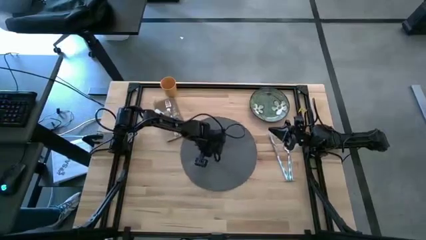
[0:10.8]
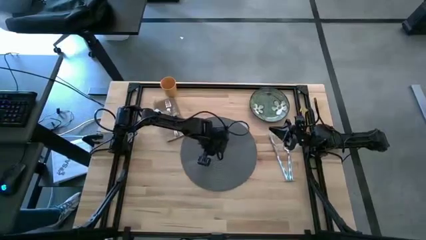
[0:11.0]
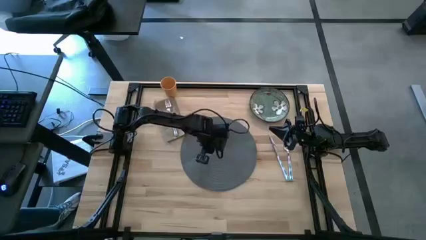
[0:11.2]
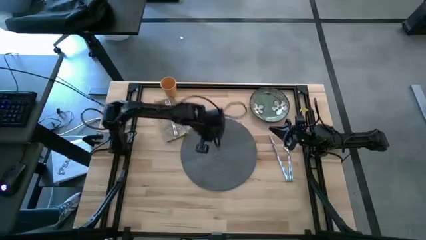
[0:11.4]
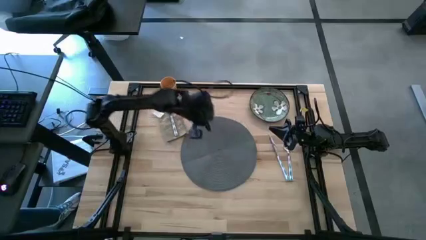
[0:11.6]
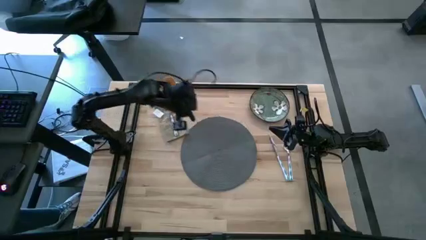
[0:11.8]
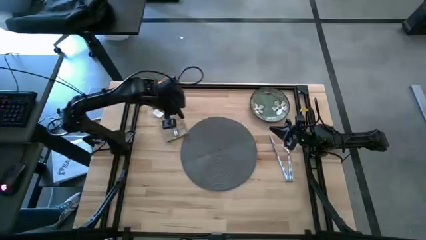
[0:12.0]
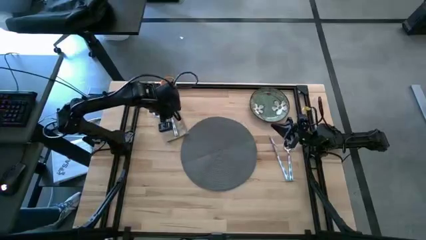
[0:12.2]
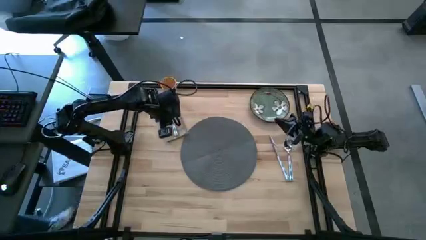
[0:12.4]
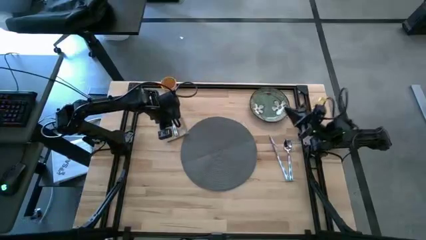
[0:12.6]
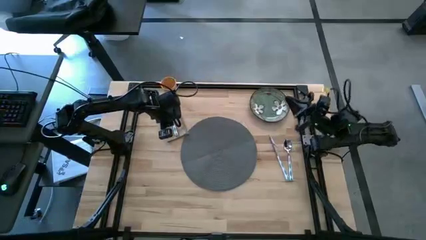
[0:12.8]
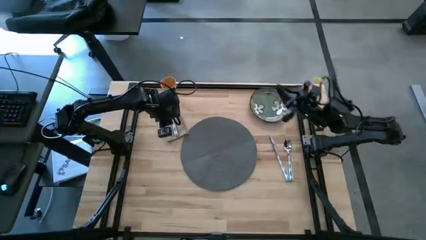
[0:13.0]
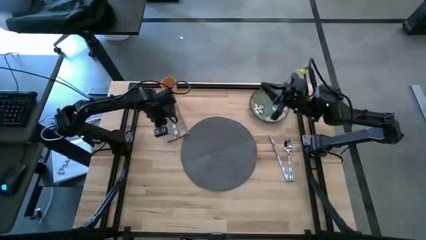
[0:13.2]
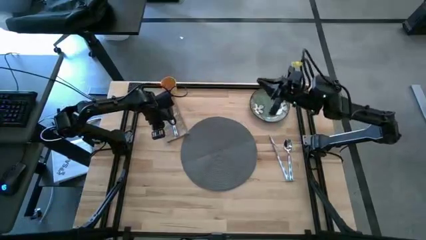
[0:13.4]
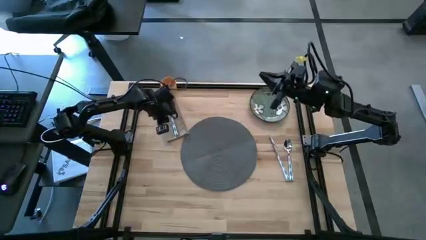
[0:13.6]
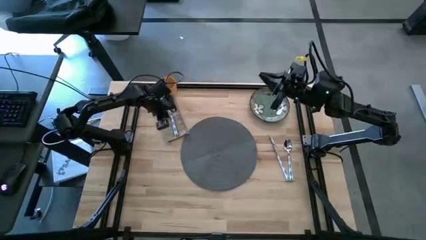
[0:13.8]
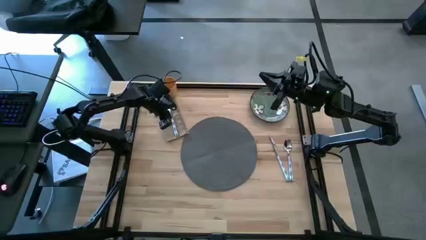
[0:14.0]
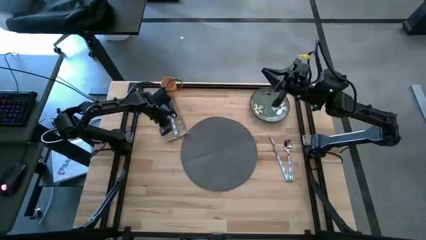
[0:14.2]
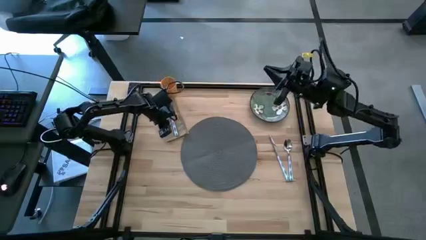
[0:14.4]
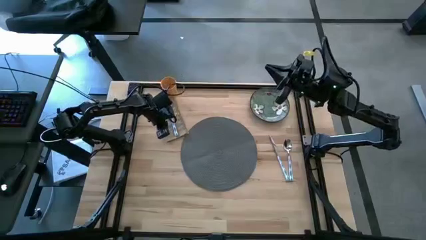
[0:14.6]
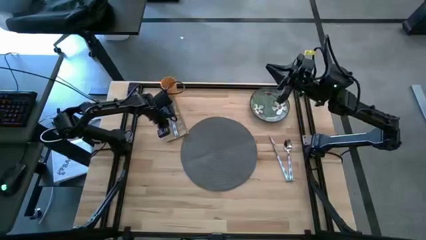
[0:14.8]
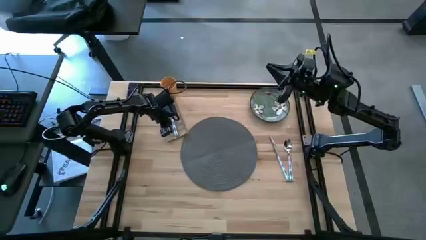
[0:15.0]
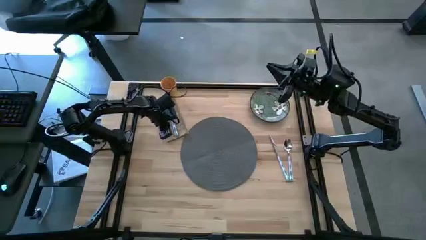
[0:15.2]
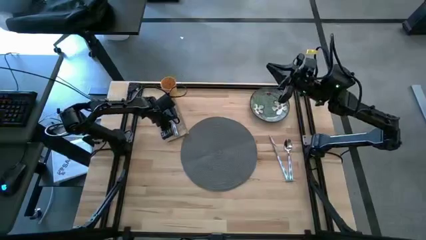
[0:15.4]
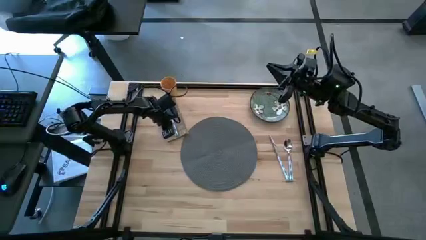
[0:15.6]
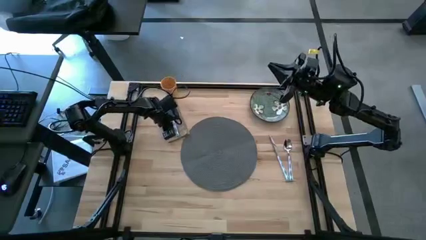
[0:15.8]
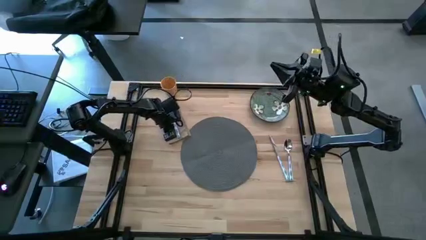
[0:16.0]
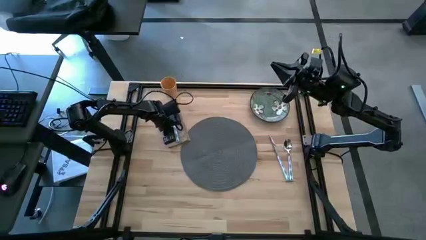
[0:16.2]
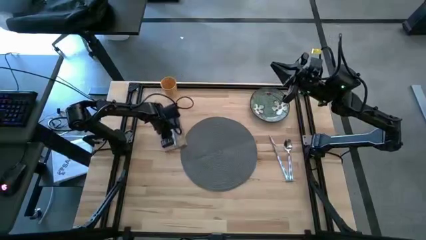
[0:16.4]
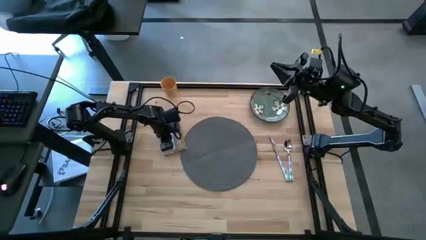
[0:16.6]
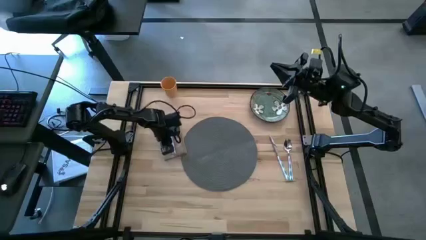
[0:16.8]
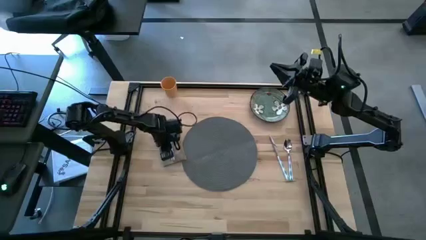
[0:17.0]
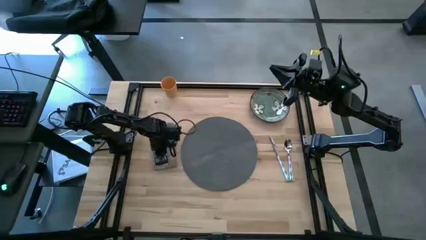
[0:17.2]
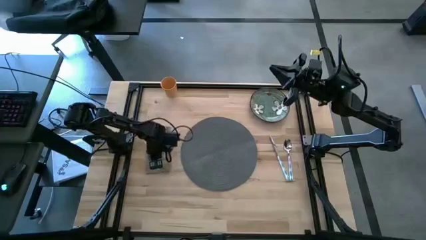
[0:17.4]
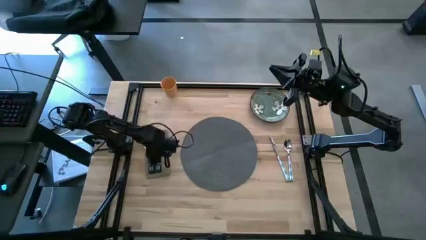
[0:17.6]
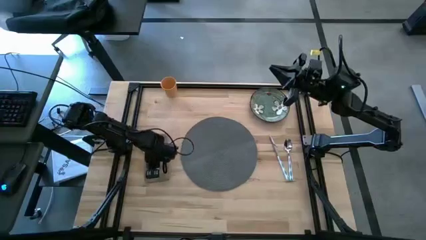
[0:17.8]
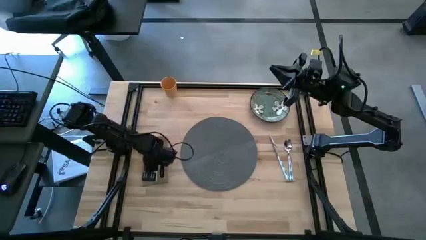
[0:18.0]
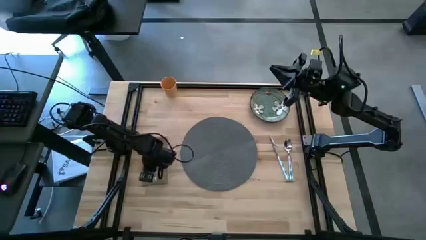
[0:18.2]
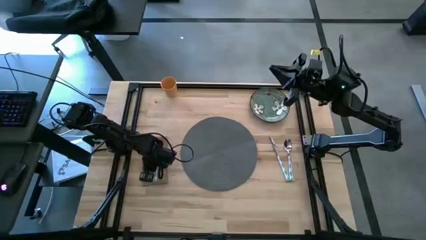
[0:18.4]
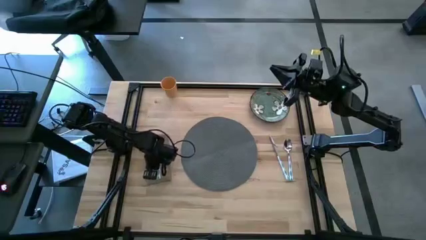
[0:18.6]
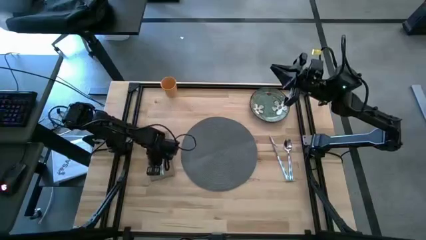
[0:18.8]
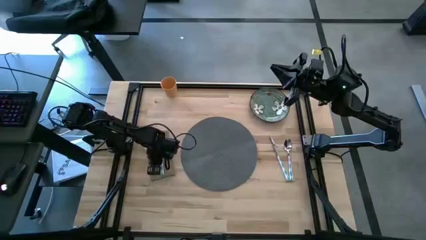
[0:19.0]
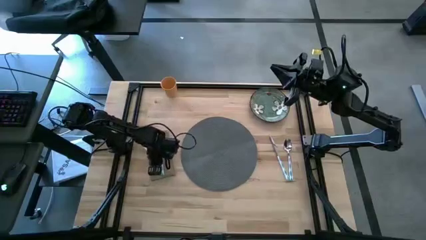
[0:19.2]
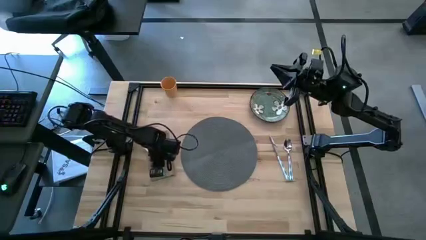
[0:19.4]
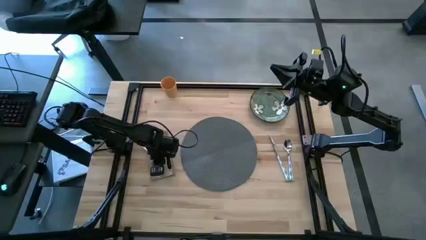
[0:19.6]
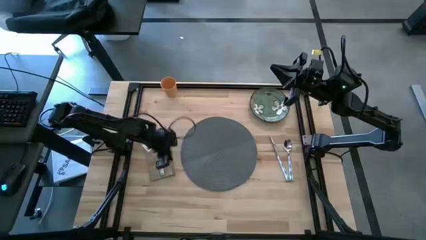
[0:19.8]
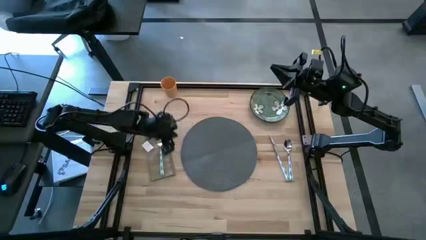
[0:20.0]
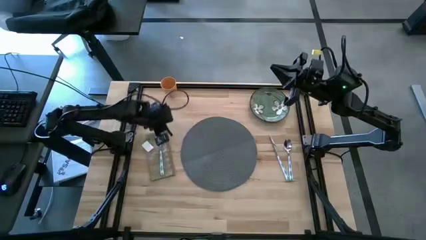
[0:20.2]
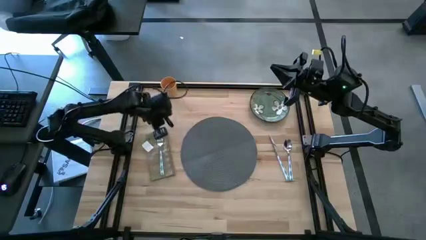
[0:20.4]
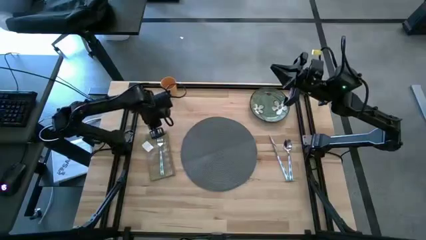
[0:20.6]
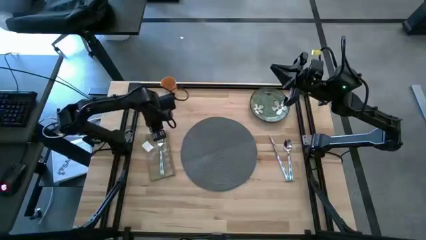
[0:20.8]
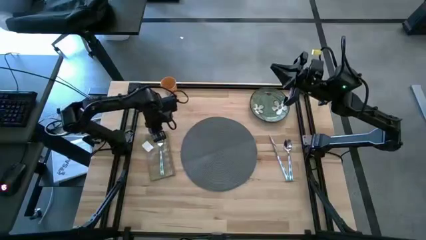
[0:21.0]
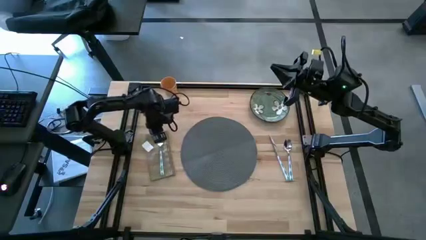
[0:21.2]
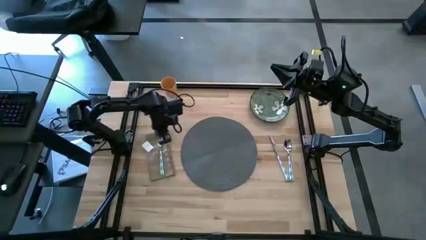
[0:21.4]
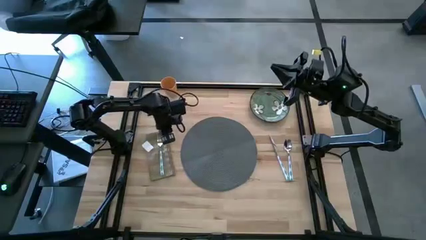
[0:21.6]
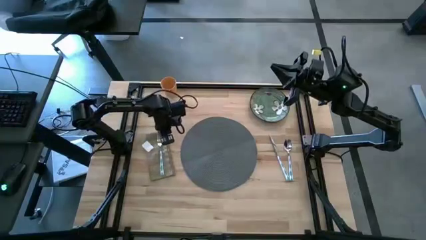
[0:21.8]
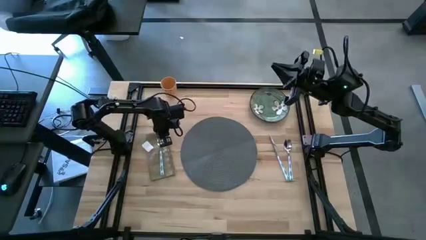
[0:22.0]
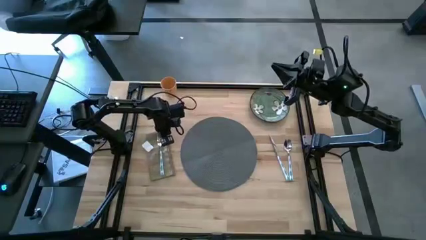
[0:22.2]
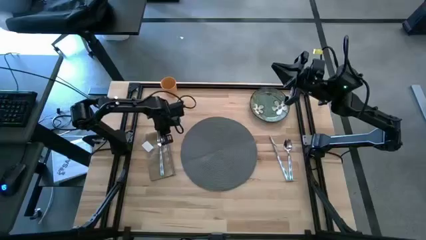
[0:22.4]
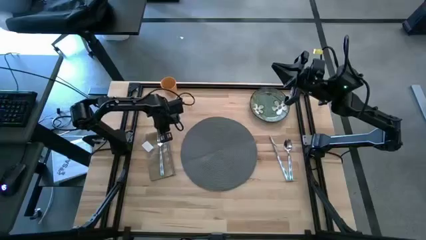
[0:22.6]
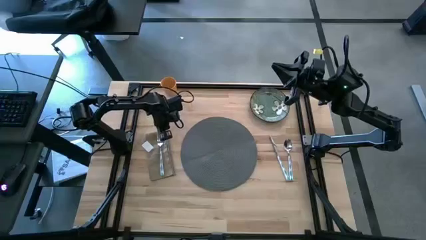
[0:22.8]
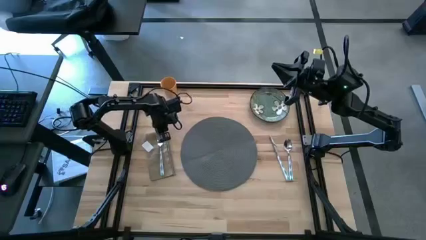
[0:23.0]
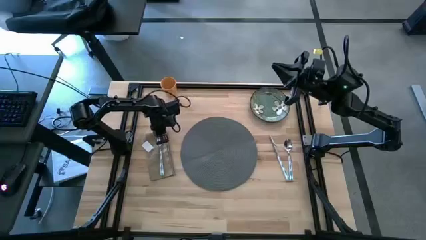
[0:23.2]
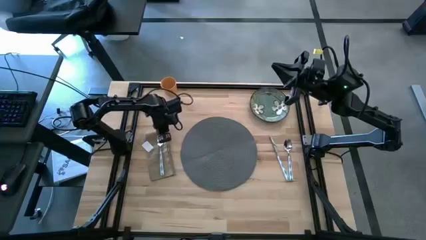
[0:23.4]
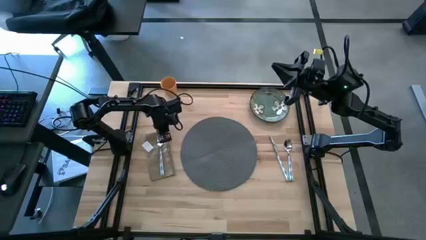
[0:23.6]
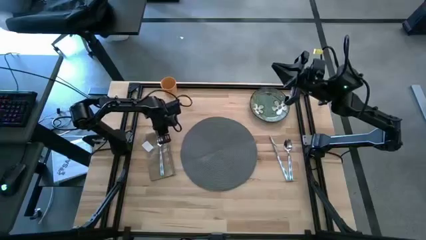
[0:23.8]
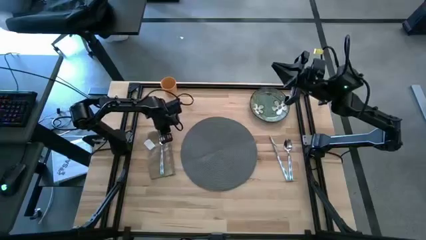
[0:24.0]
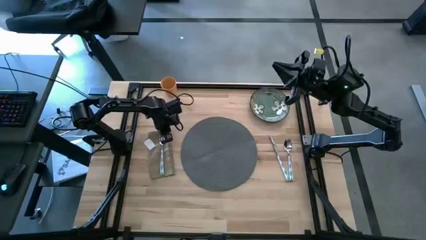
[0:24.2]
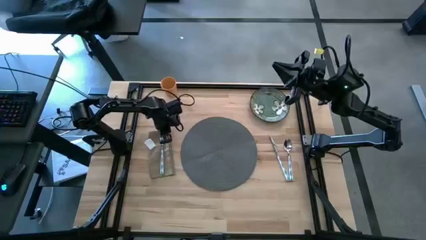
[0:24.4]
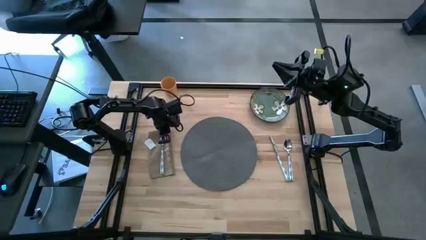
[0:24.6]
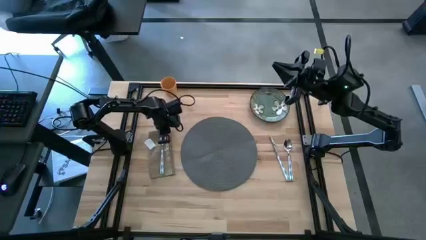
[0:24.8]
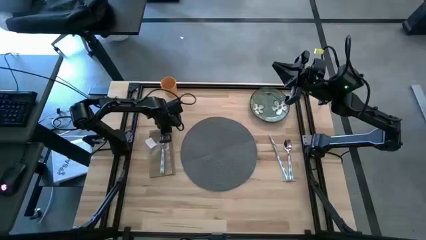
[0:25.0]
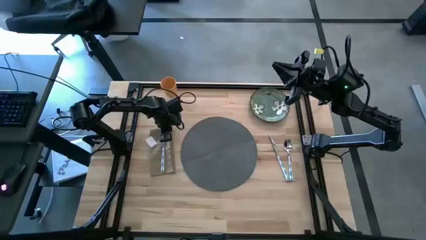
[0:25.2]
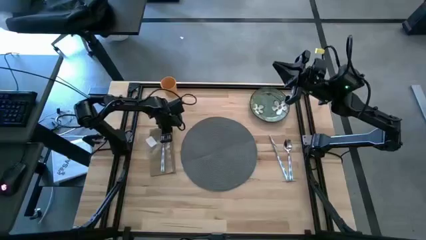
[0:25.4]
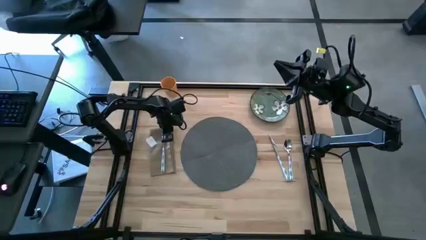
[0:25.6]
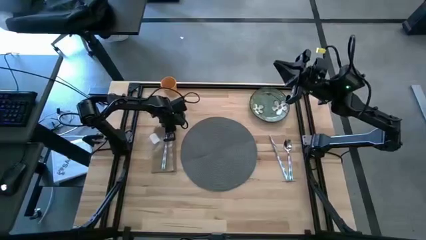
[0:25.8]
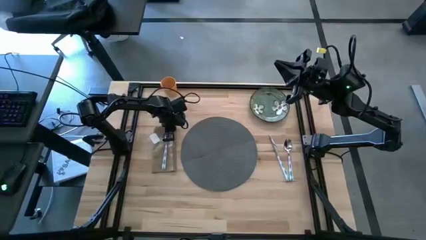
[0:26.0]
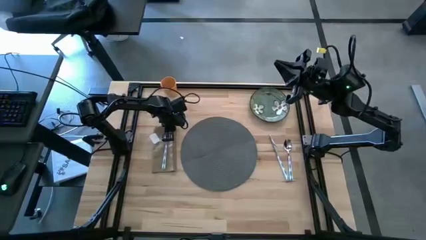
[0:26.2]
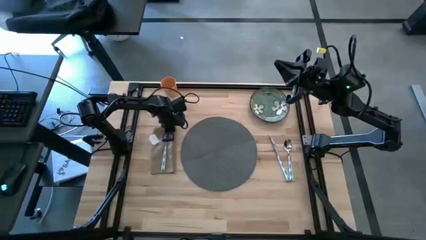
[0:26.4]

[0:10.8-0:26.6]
Task: Set table place
Move the brown table napkin to the left of the gray table mat
